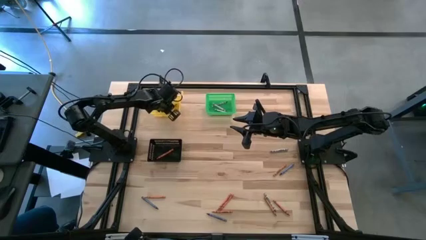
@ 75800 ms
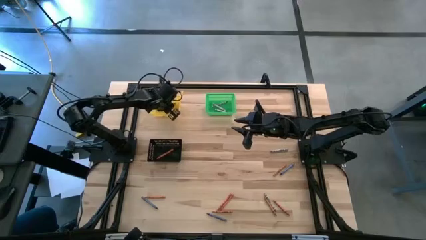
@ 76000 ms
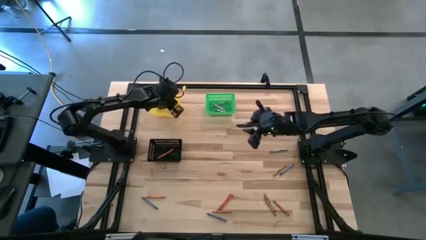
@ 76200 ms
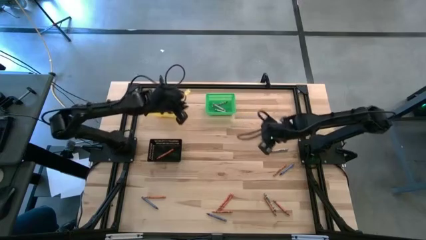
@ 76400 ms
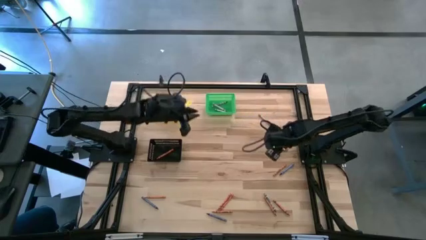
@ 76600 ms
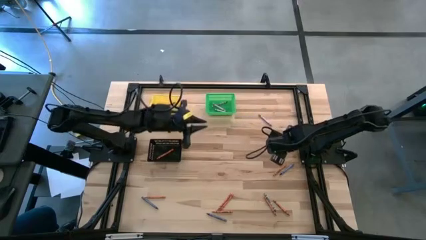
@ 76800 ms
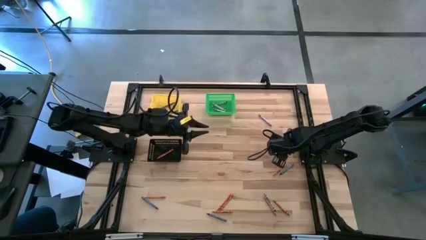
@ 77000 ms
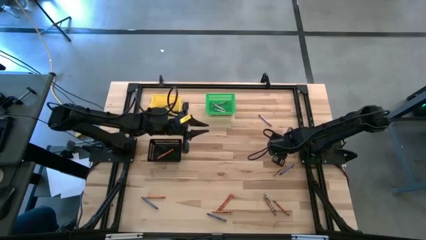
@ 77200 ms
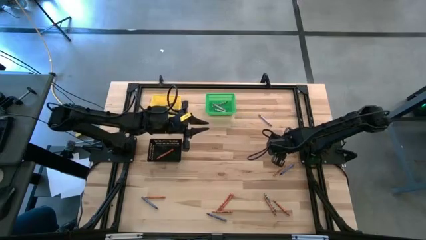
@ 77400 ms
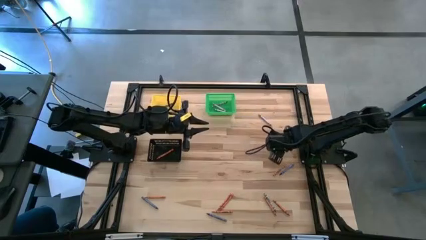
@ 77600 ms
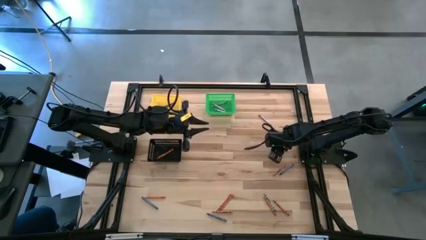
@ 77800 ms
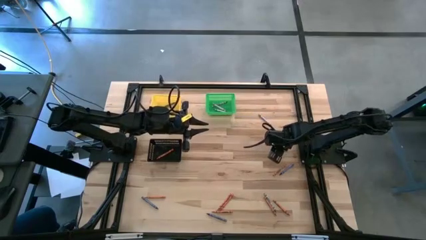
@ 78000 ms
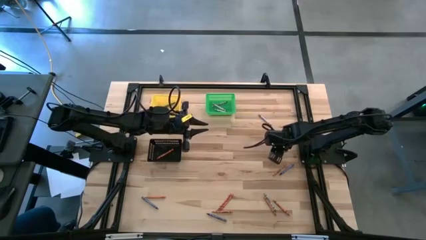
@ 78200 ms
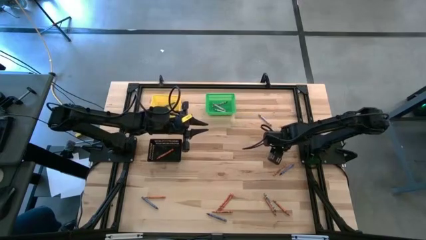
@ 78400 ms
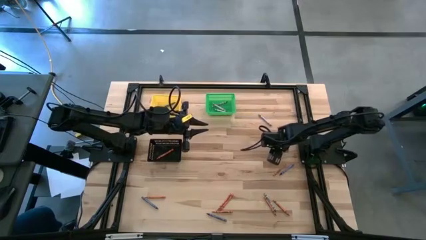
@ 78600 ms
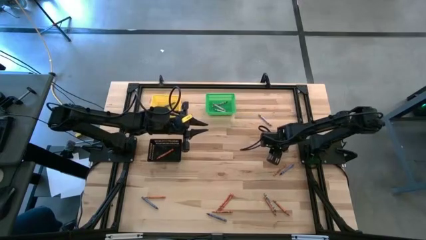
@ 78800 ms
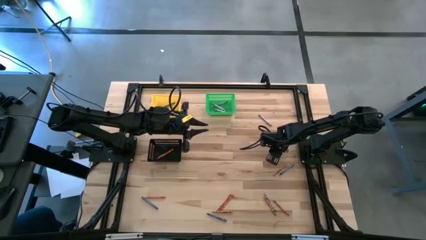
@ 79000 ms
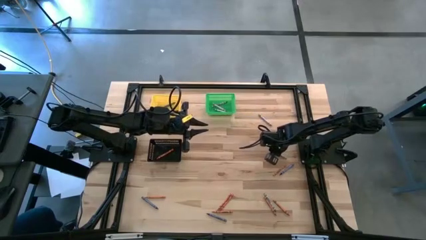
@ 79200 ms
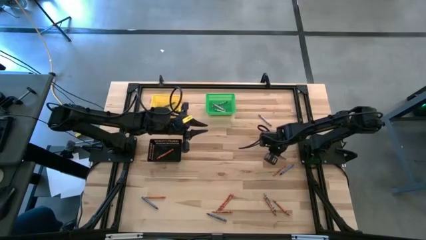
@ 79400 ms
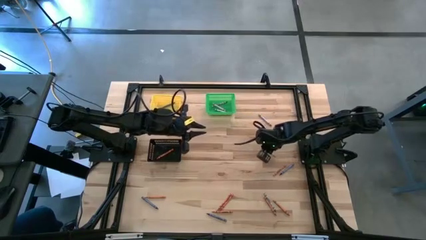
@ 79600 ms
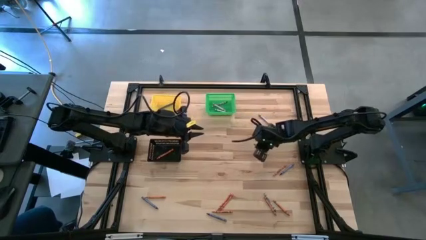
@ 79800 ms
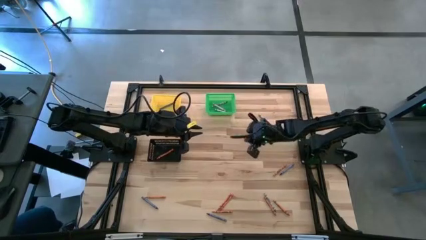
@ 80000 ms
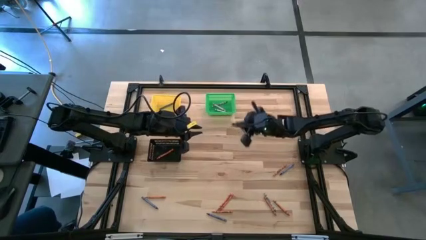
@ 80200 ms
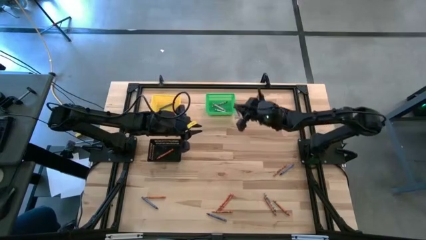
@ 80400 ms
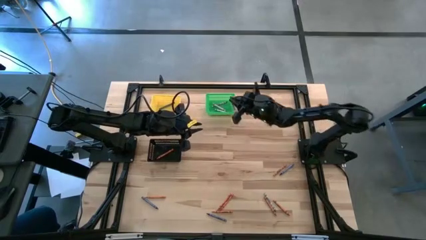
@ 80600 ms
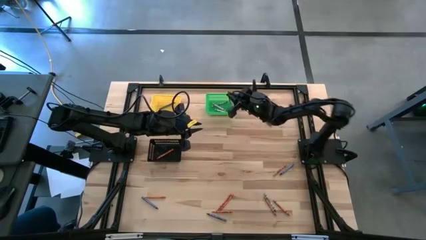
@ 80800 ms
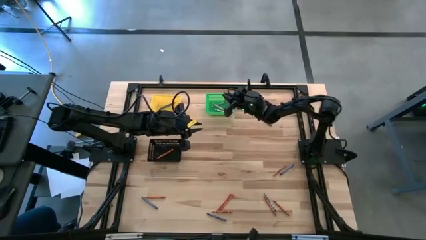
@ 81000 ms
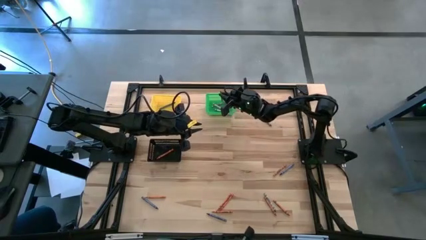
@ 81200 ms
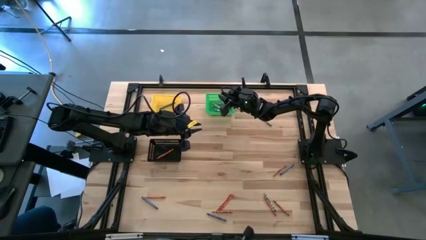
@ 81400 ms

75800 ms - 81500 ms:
Task: Sort crayons
Put the gray crayon into the green bin

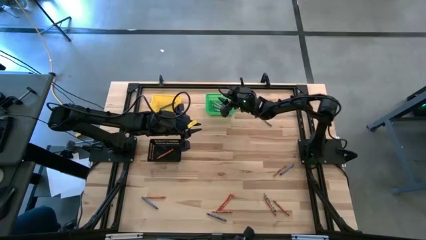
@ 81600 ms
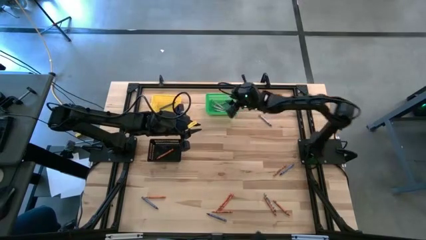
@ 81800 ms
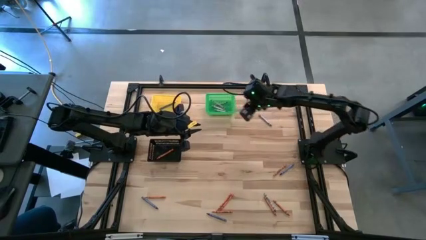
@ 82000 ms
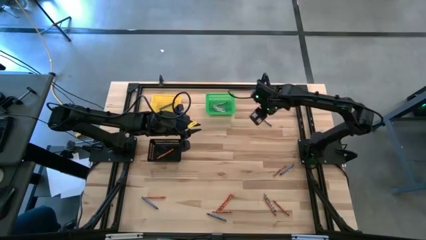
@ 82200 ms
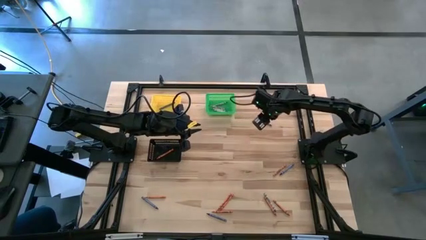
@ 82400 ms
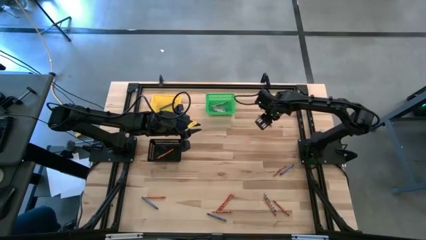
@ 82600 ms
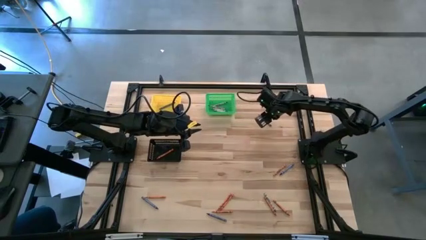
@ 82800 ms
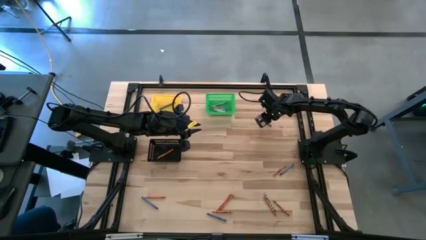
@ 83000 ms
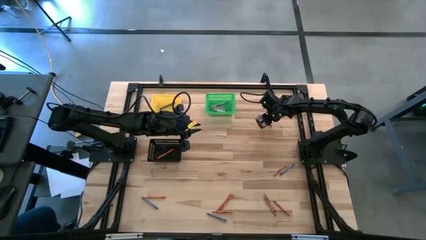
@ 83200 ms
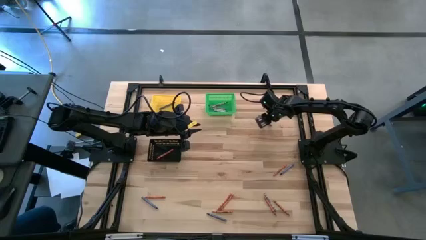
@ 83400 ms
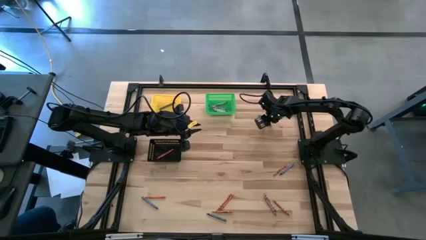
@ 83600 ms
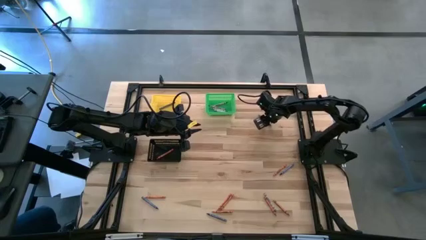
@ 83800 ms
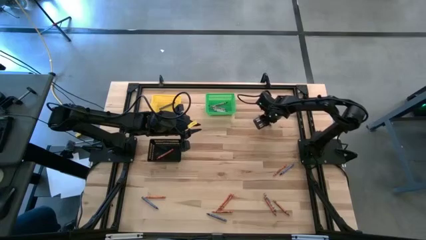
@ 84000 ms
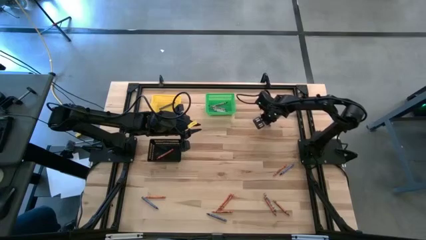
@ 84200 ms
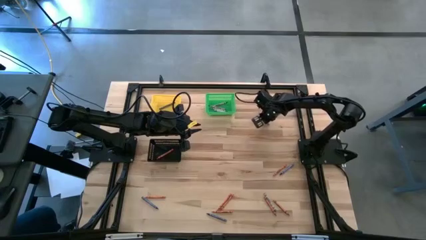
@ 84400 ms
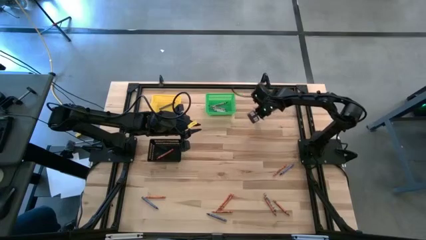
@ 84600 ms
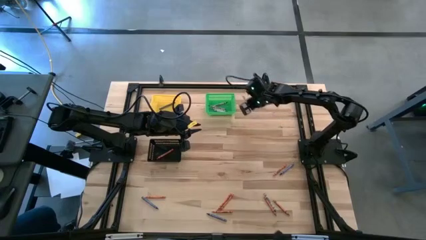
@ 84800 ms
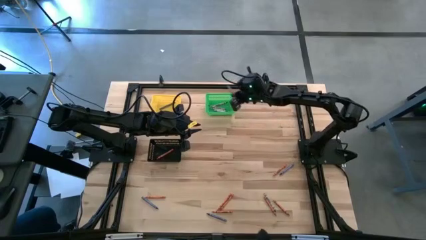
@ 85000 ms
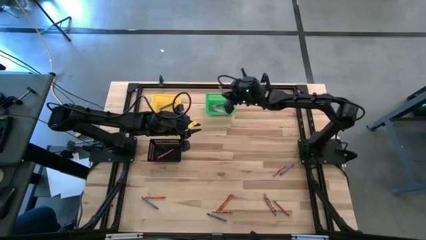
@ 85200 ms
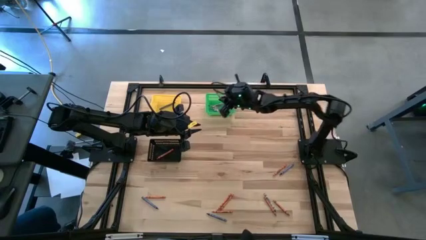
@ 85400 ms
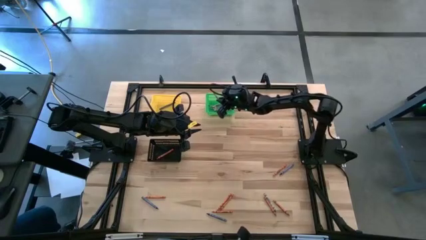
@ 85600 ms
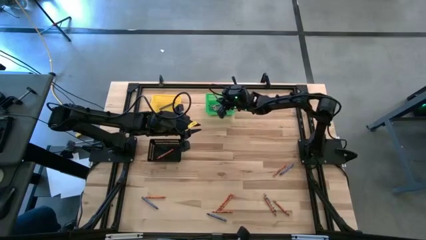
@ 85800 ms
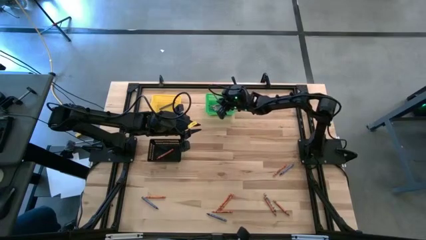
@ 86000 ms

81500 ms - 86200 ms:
Put the gray crayon into the green bin

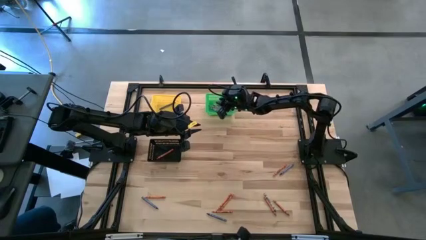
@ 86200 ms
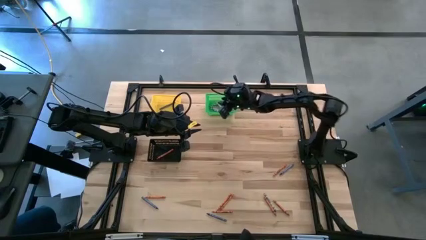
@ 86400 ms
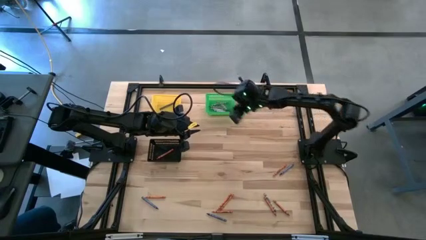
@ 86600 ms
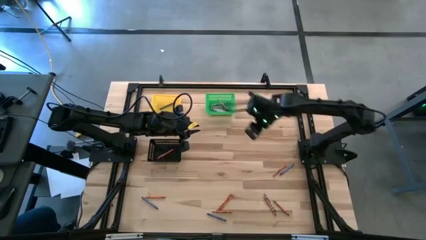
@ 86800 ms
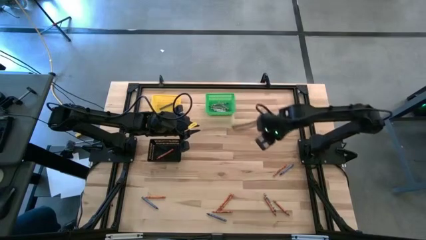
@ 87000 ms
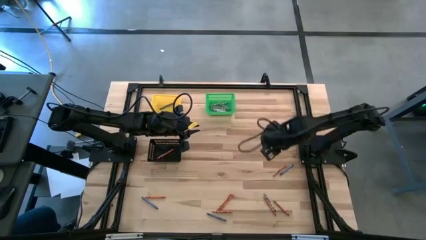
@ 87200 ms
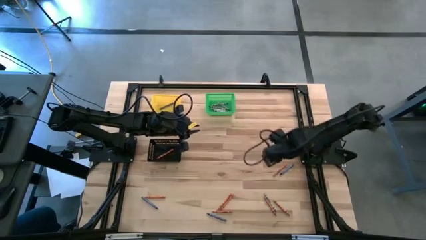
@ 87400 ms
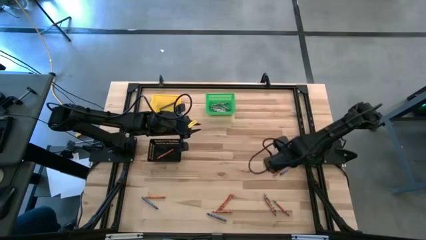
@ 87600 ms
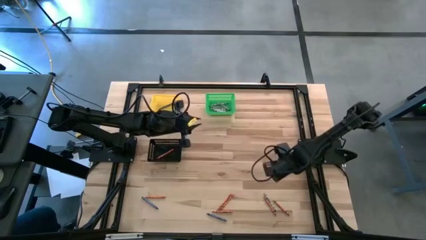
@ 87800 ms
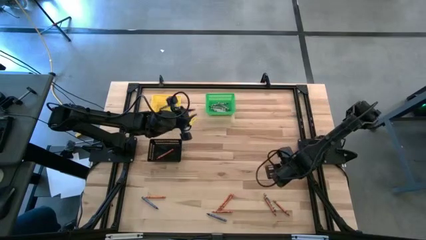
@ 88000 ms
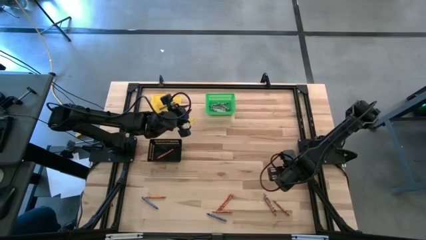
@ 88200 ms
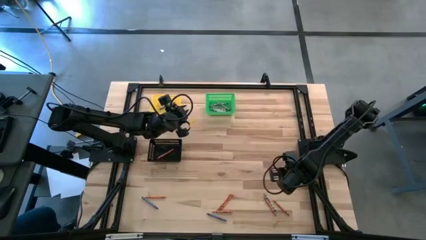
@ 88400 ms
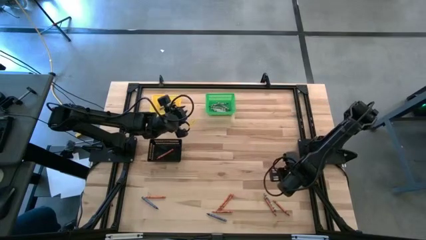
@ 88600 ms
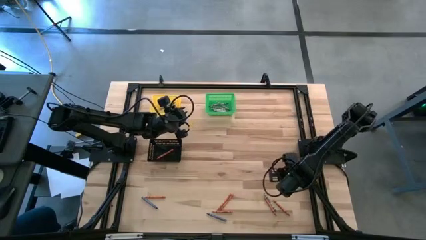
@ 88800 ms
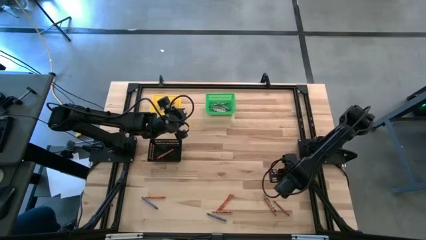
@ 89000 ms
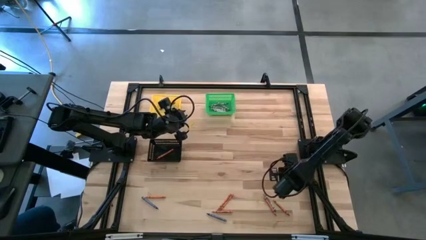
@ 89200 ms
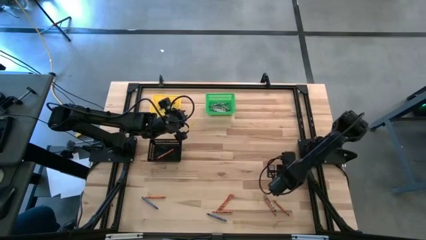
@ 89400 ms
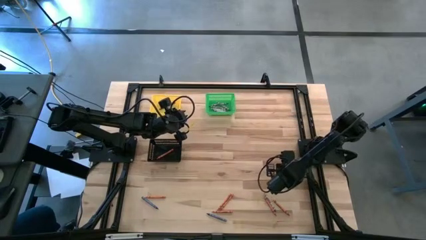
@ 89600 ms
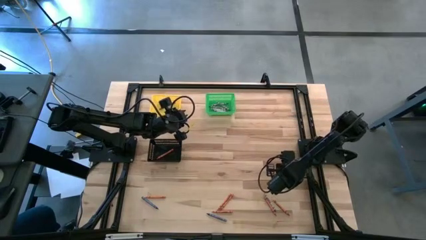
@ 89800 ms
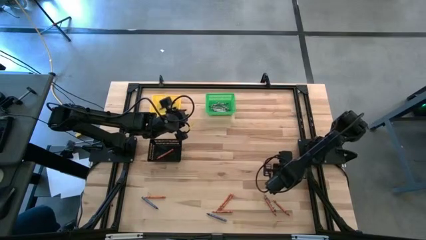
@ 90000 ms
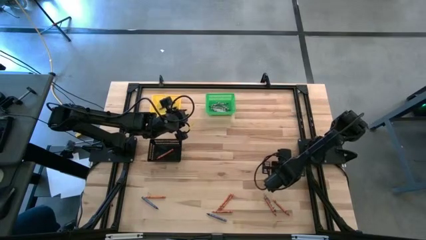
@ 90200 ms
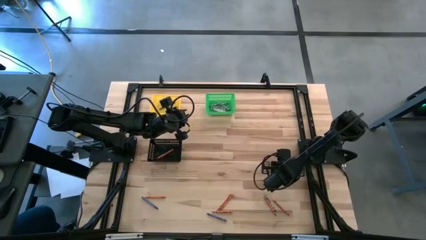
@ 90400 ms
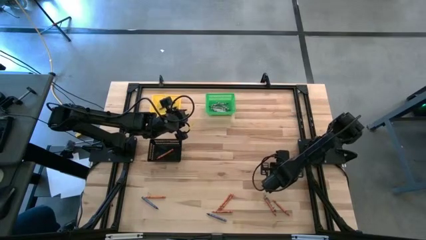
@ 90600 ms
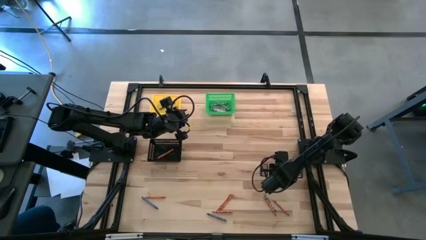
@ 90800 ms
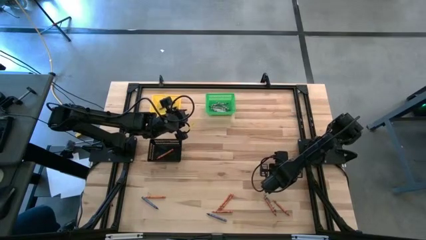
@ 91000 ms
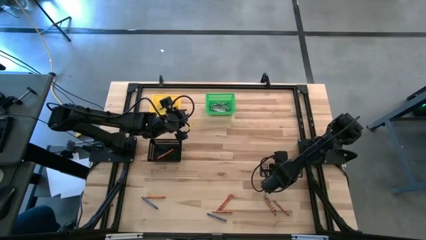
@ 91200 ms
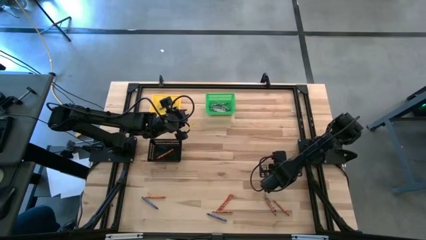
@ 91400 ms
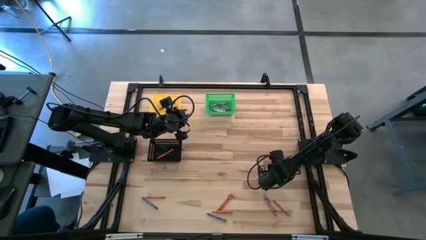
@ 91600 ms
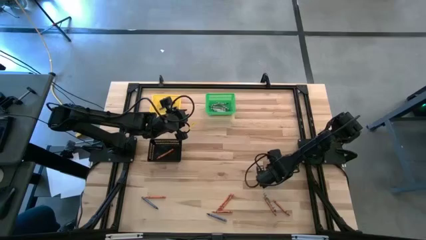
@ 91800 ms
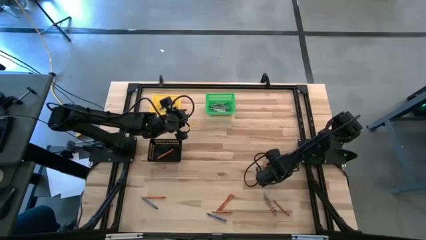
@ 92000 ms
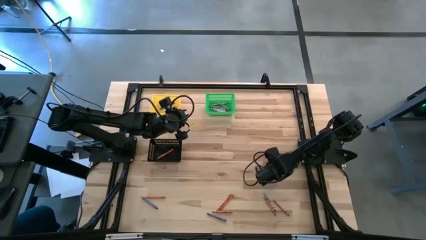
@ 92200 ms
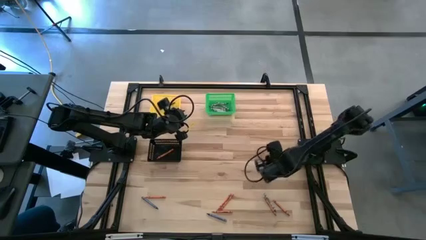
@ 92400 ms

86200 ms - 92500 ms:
Put the orange crayon into the black bin
